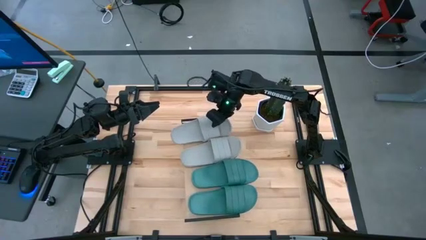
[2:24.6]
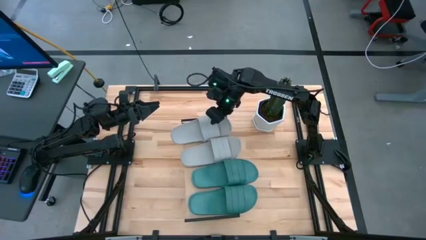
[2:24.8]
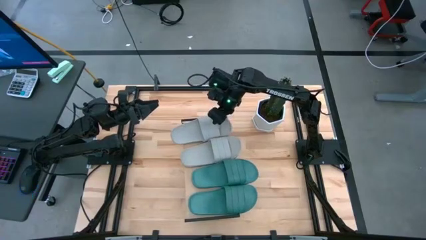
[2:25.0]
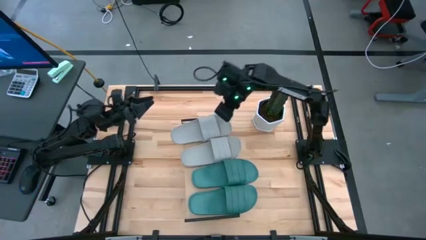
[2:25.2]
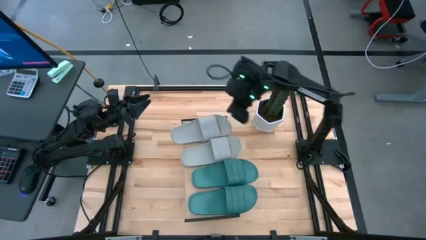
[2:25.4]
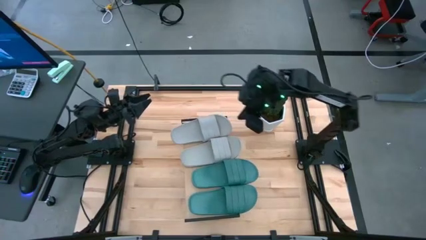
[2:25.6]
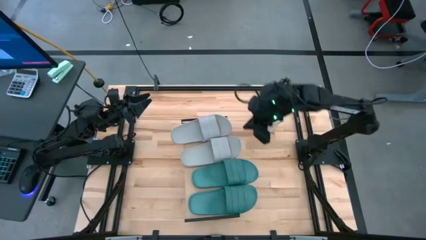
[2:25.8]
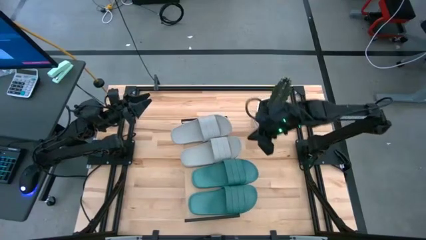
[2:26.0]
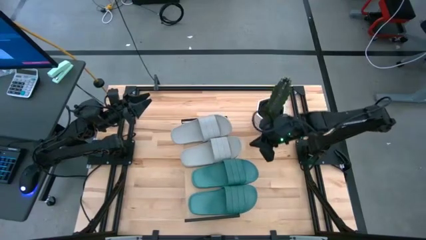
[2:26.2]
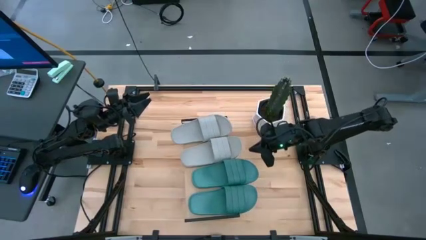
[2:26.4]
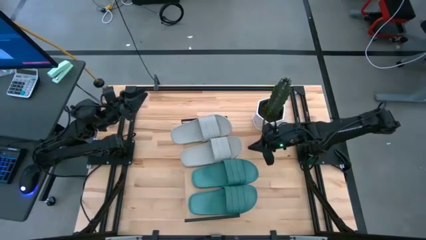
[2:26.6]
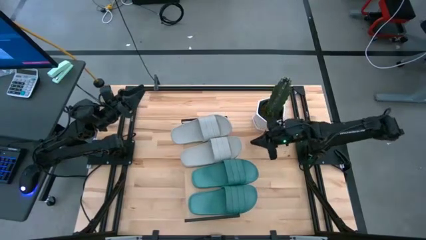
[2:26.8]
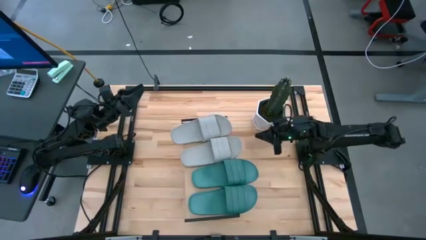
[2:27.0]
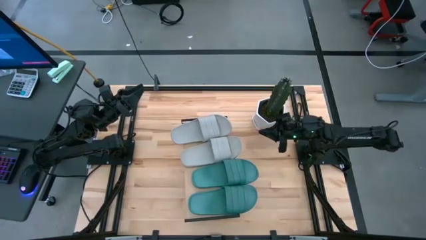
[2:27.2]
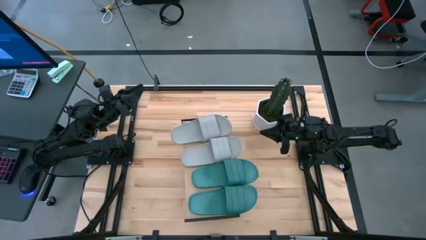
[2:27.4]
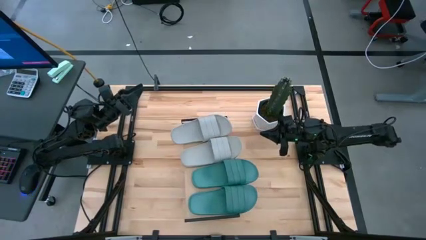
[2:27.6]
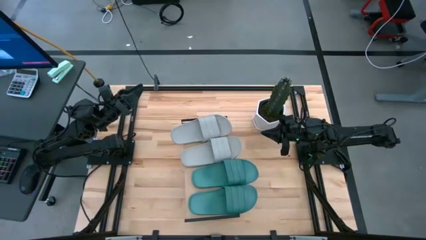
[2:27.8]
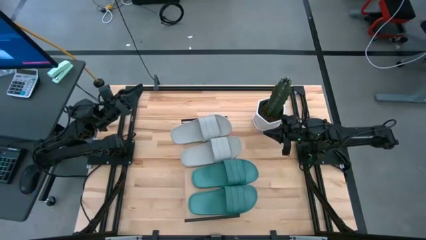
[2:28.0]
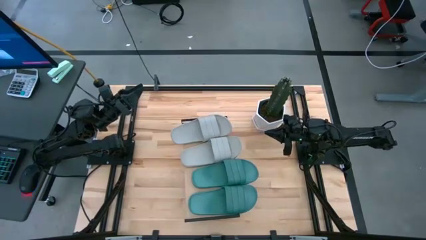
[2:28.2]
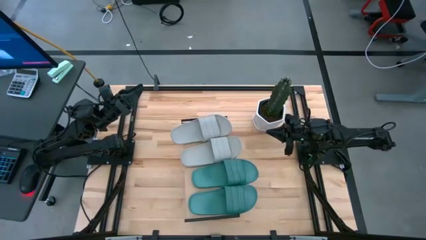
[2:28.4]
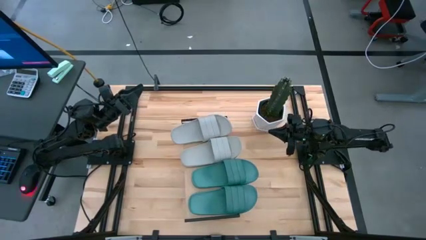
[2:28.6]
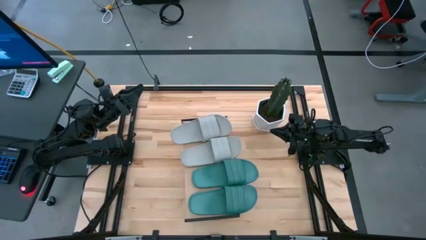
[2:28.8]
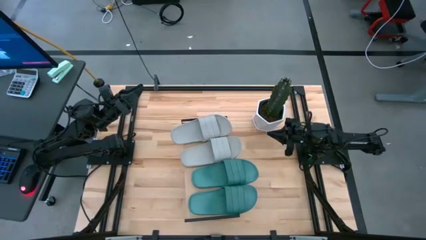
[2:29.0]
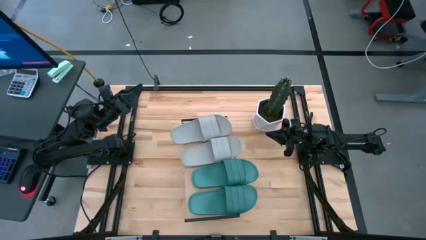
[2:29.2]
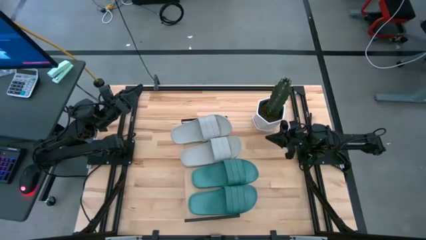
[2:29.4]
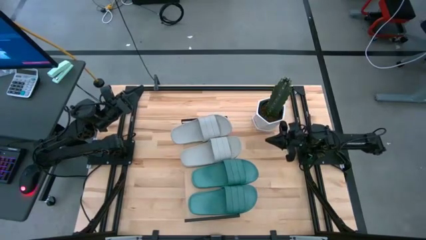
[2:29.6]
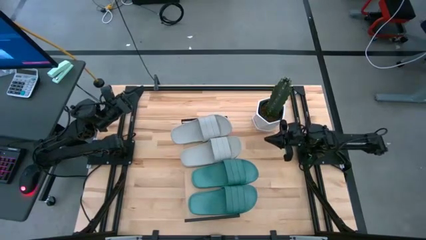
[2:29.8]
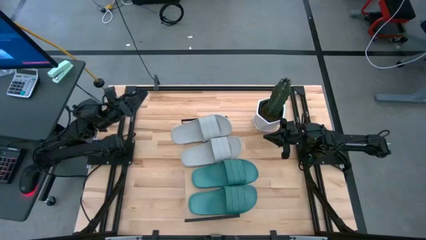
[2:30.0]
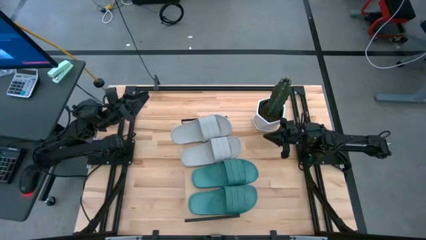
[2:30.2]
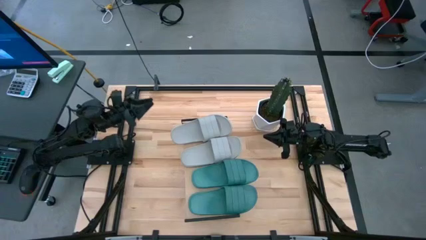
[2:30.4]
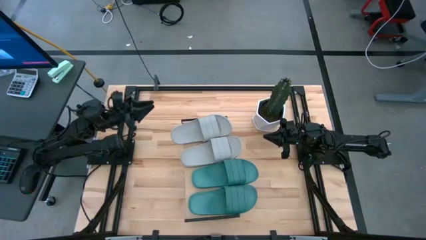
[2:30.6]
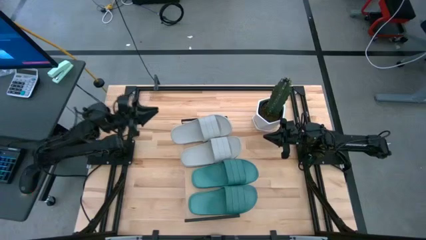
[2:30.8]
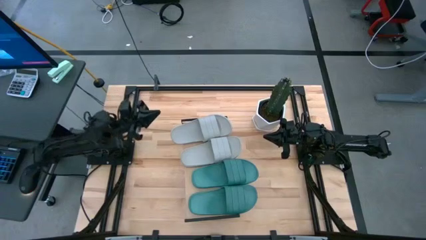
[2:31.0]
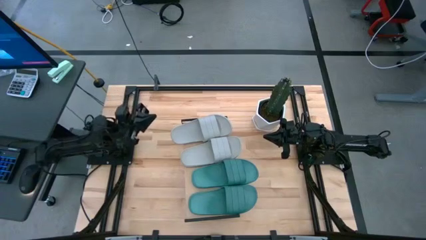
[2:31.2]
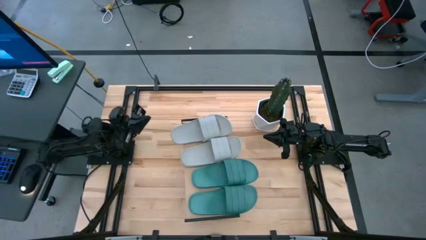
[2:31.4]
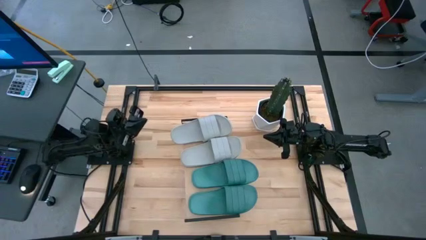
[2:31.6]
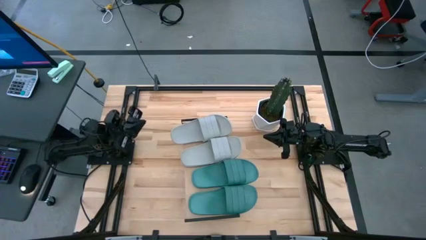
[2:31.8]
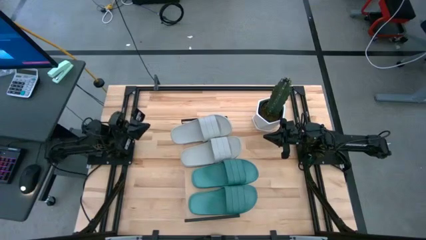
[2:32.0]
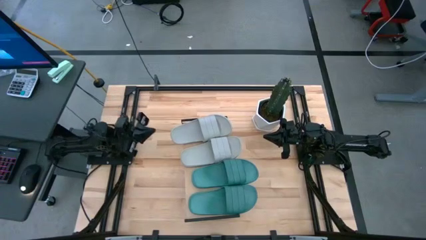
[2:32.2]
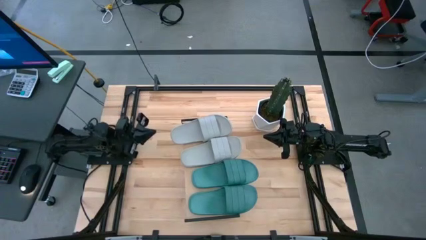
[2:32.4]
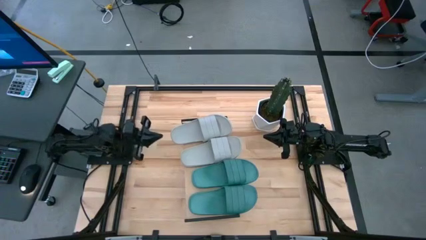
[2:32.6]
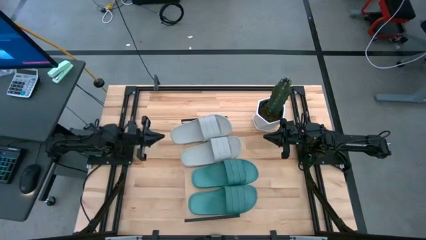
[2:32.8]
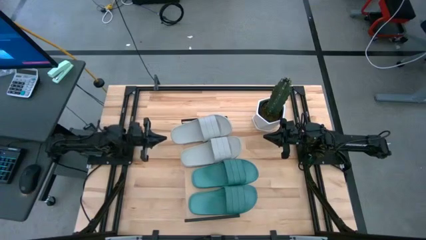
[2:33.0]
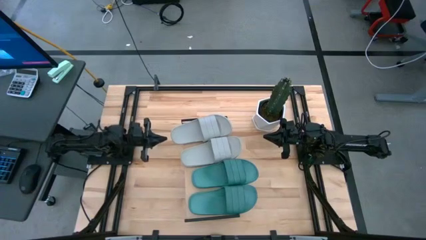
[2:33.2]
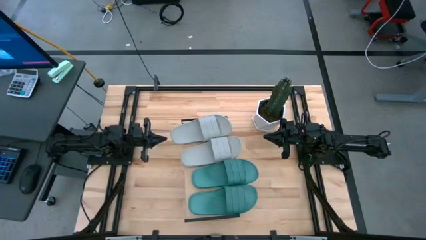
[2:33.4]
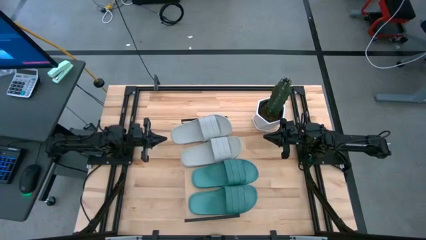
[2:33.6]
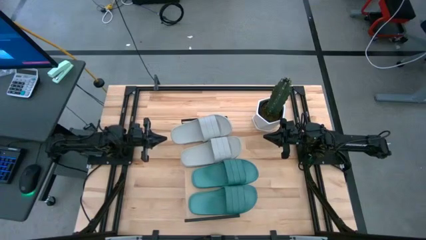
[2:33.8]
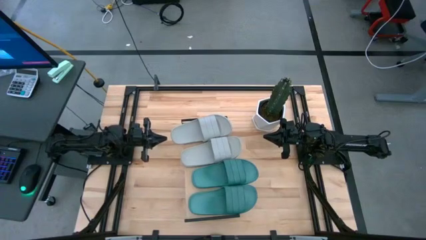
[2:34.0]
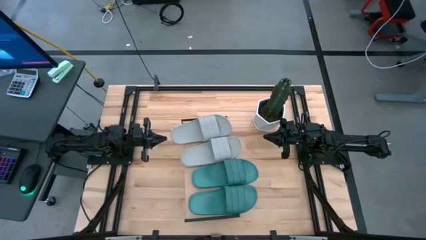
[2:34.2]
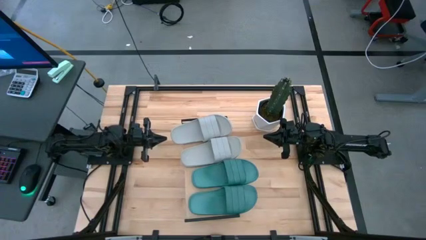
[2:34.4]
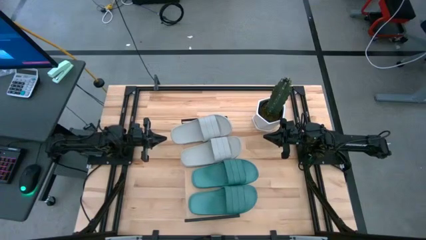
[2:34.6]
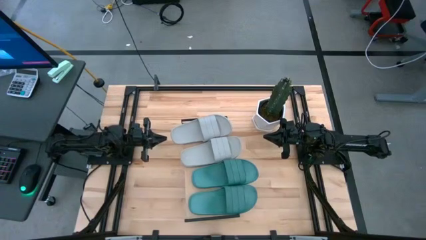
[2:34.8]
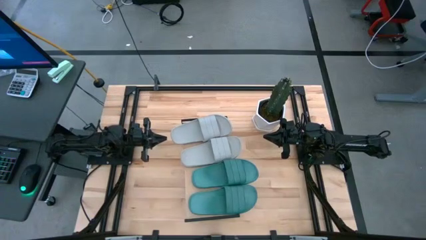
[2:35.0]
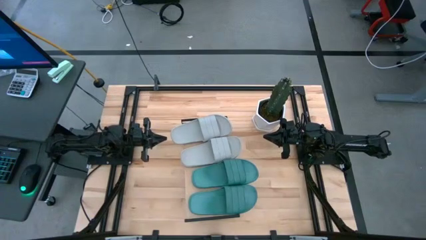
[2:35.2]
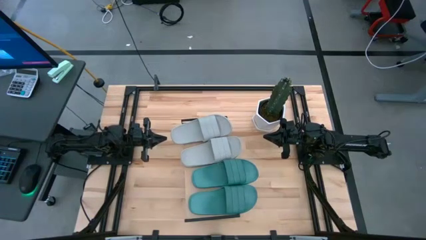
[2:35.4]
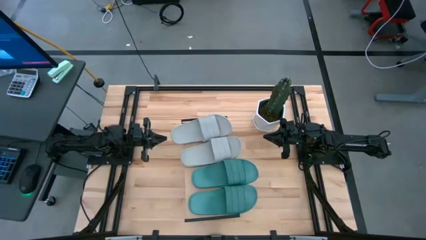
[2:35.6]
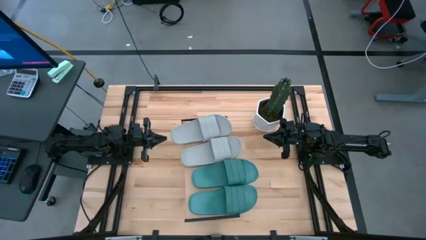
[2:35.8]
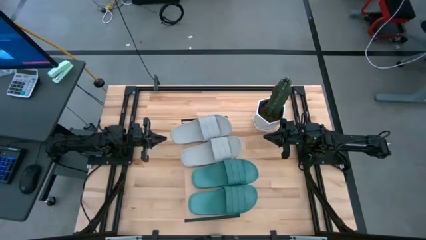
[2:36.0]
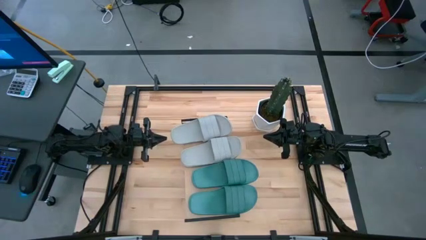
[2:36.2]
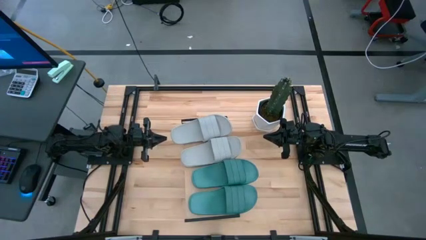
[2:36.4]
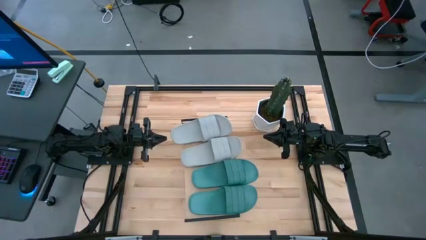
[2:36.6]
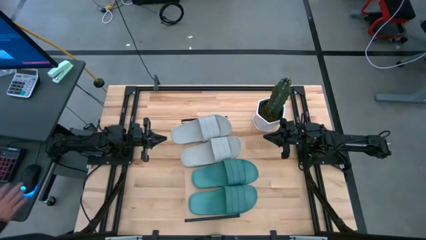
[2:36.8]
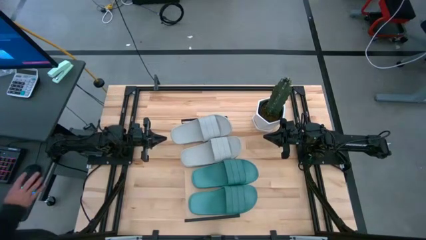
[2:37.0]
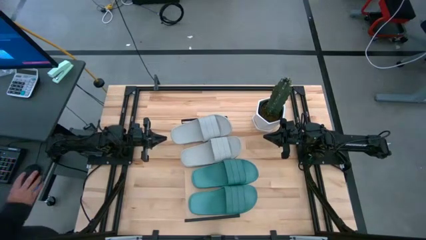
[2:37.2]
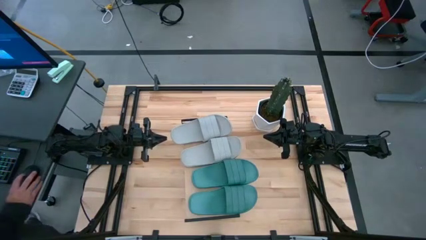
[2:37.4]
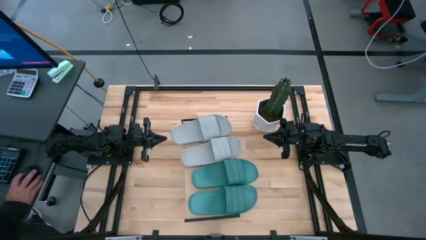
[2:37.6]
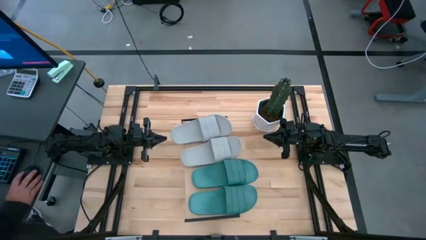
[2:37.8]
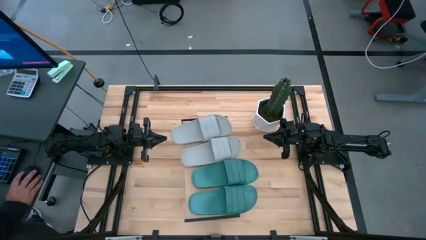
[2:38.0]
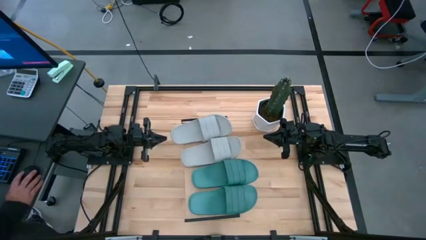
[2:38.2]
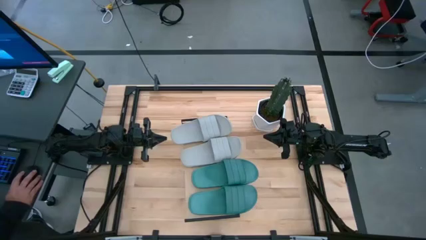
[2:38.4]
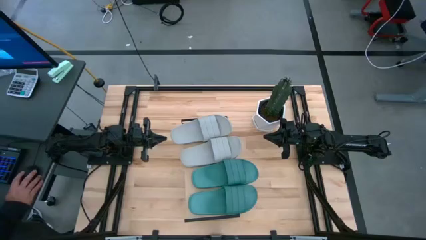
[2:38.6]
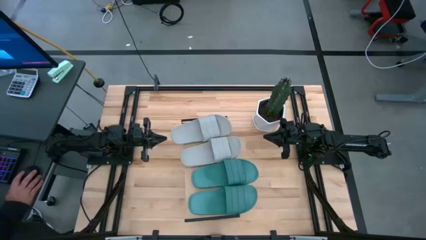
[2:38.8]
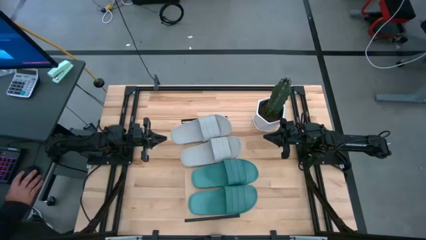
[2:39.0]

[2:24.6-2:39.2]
Task: Pick and place slides into the shelf
Return to Home Position

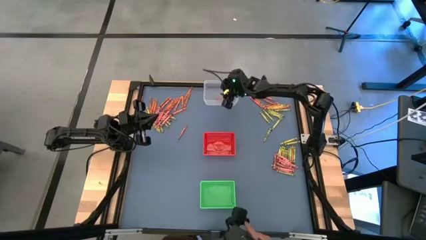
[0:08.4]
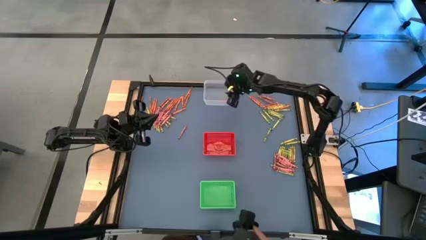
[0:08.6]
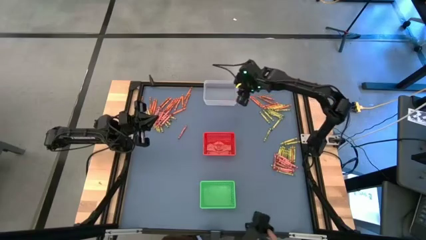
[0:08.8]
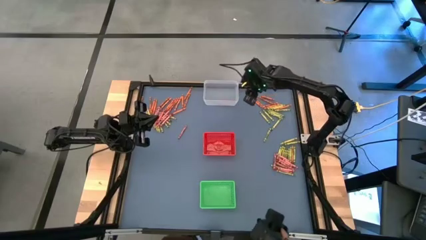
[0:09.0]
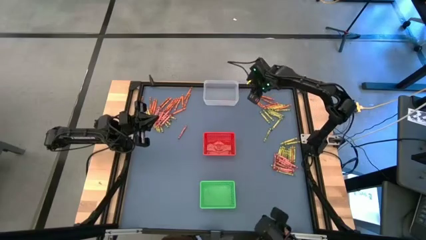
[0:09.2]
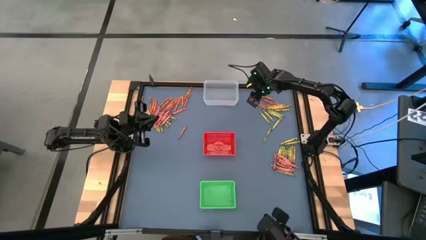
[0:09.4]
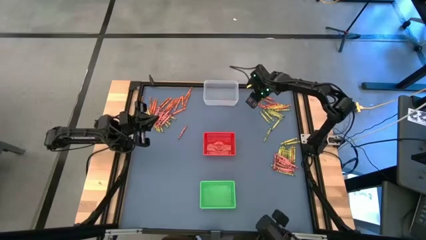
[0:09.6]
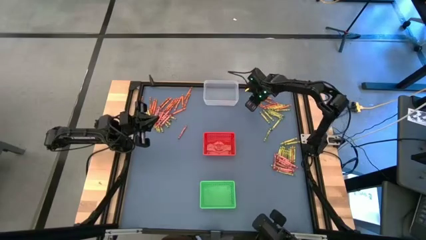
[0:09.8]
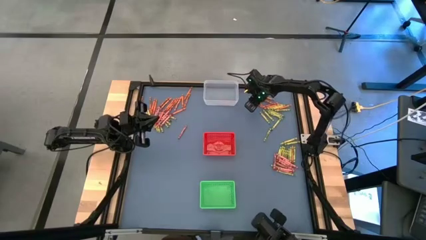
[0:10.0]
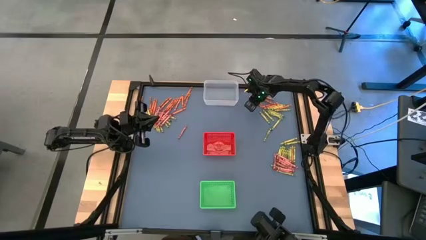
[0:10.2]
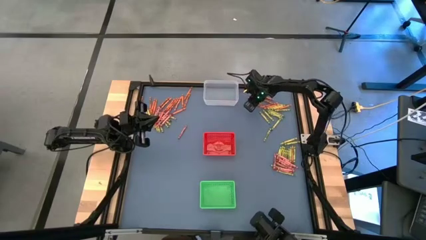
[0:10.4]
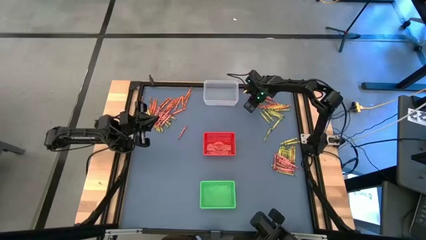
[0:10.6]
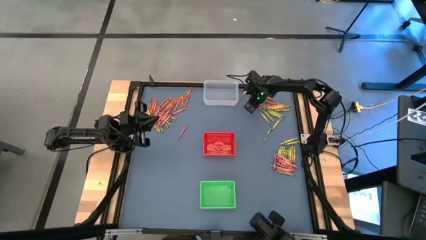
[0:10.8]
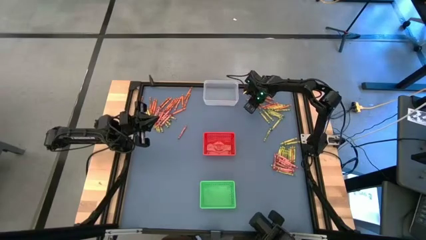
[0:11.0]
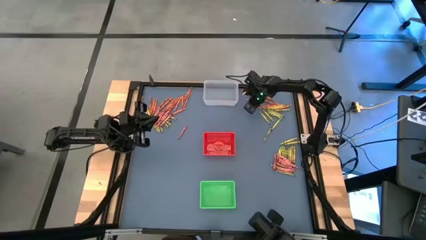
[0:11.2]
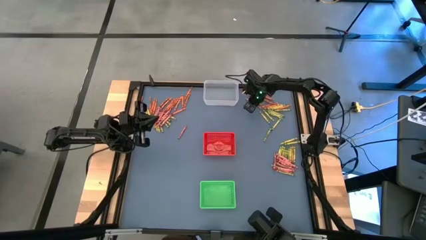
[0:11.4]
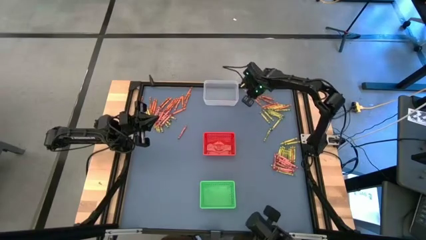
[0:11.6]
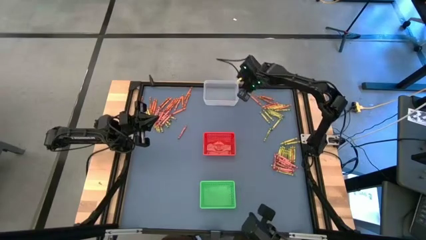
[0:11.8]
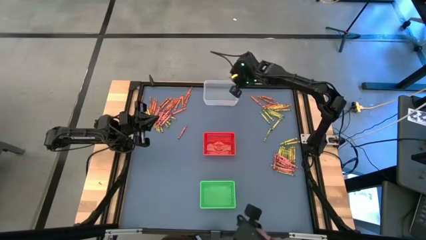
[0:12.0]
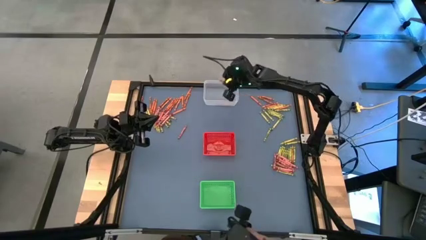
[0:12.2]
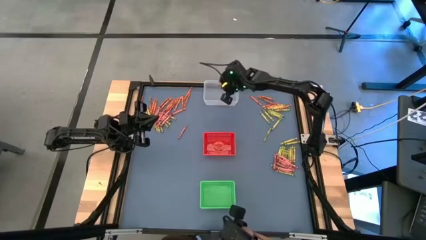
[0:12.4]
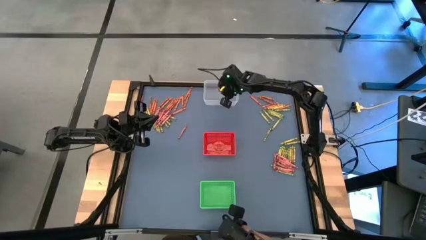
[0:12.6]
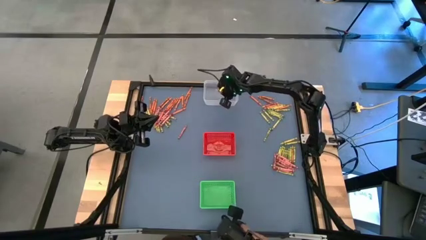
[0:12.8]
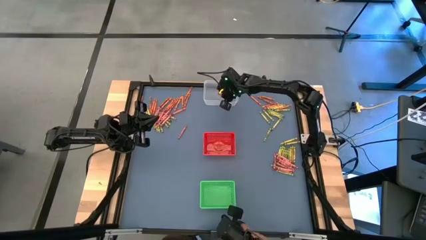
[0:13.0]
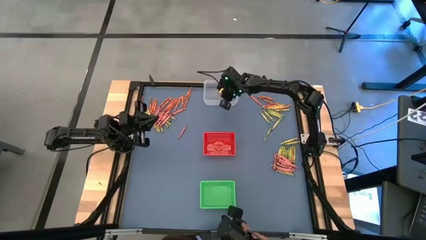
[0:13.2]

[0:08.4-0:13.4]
Task: Sort crayons
Put the orange crayon into the transparent bin
